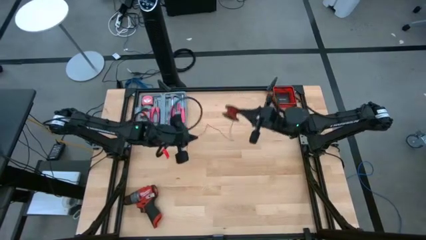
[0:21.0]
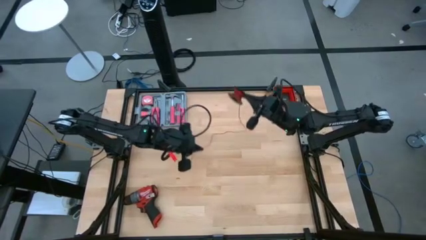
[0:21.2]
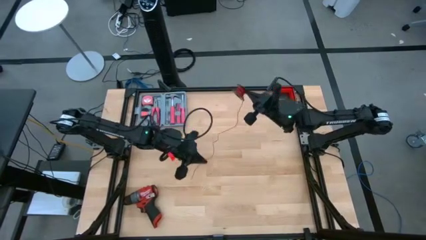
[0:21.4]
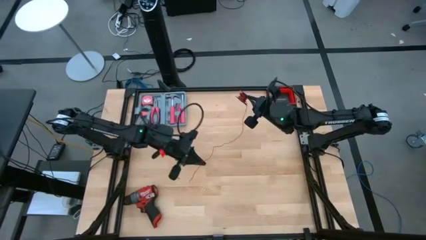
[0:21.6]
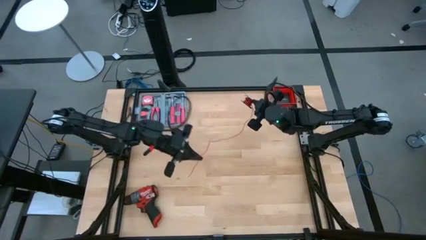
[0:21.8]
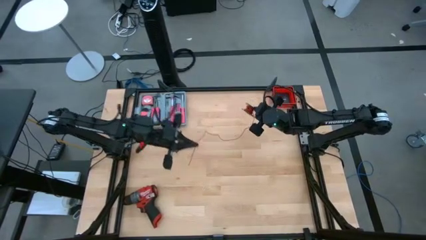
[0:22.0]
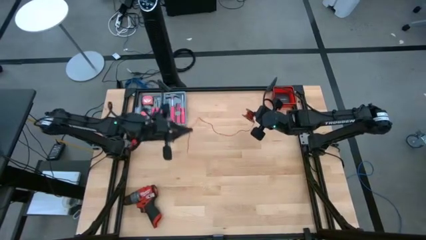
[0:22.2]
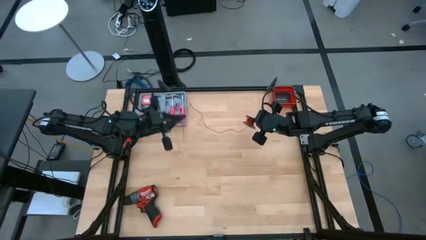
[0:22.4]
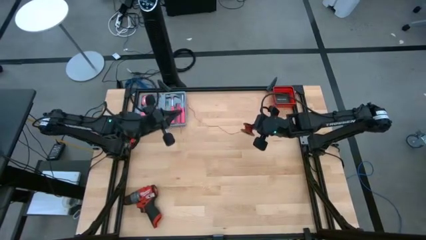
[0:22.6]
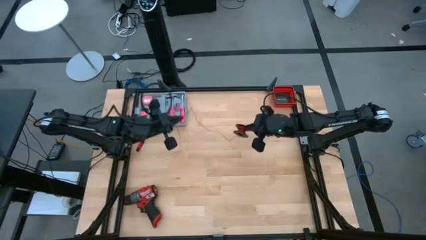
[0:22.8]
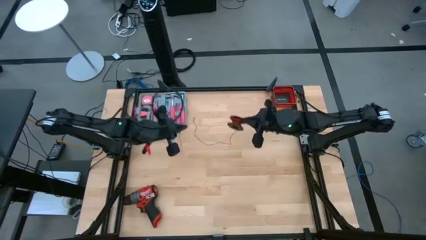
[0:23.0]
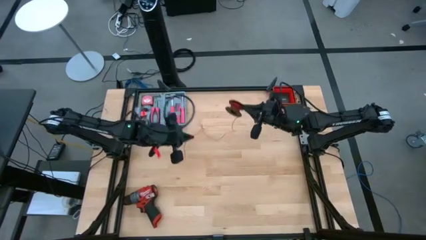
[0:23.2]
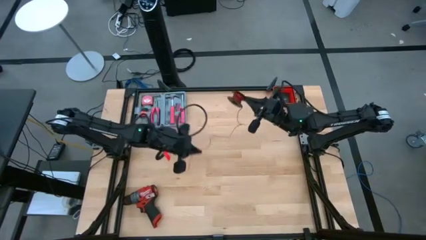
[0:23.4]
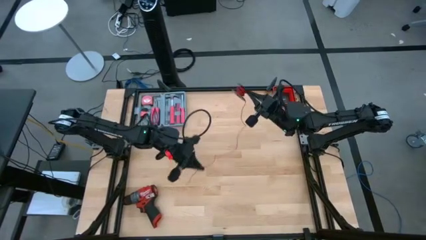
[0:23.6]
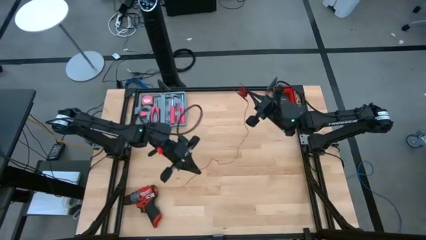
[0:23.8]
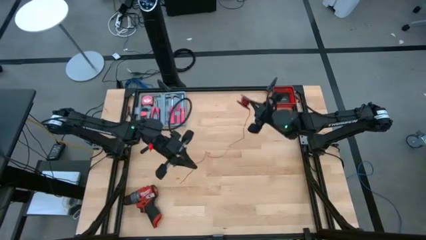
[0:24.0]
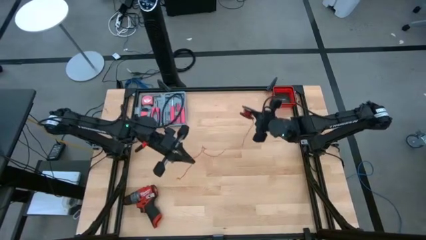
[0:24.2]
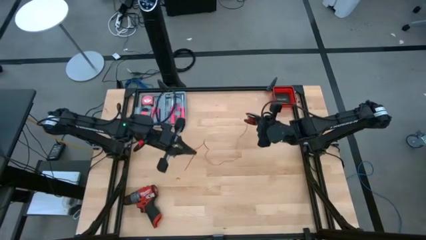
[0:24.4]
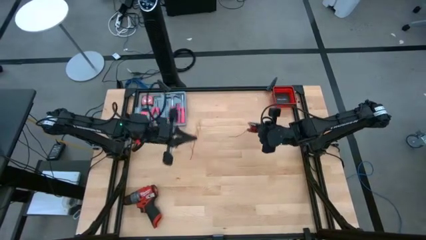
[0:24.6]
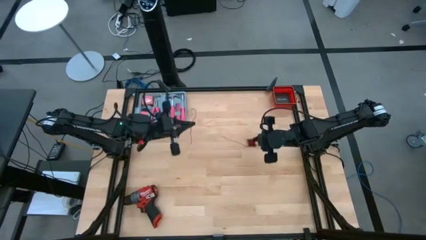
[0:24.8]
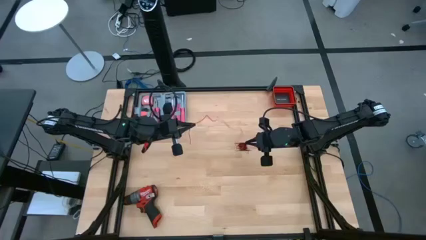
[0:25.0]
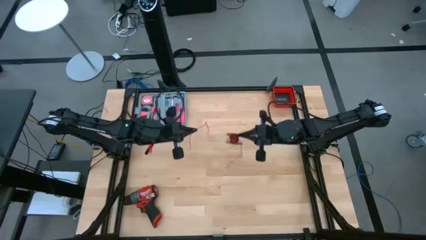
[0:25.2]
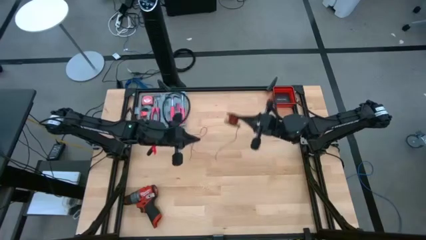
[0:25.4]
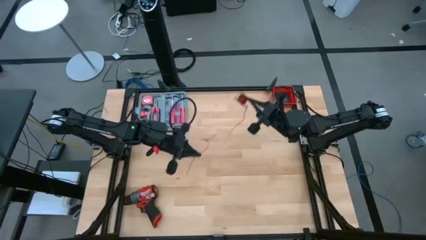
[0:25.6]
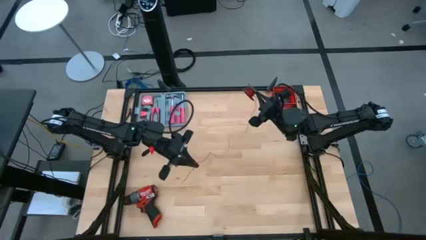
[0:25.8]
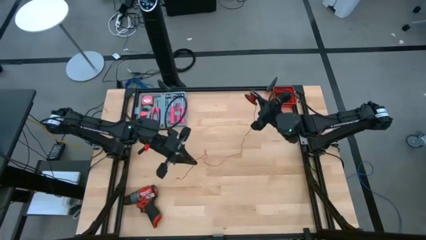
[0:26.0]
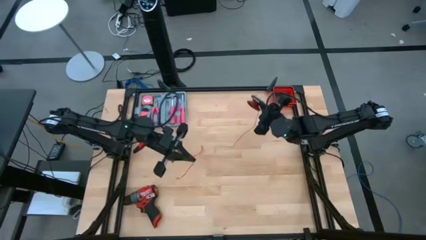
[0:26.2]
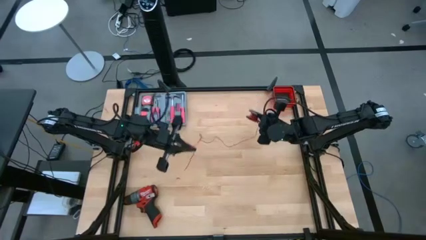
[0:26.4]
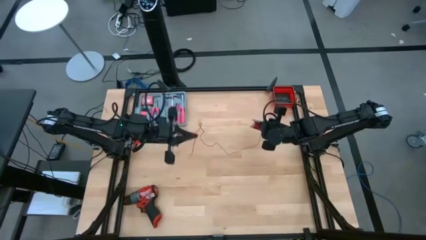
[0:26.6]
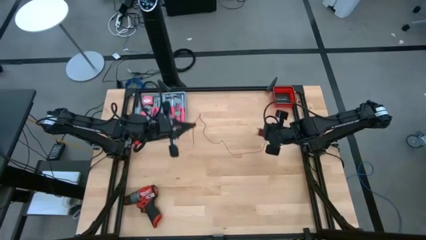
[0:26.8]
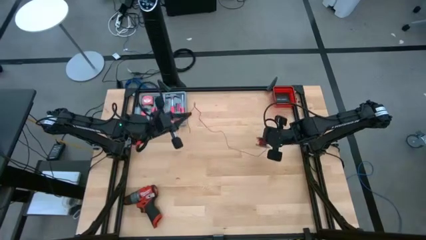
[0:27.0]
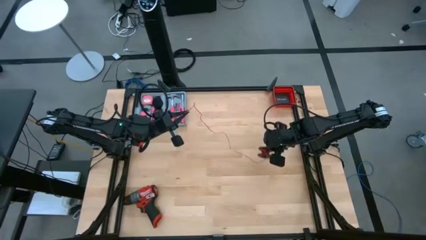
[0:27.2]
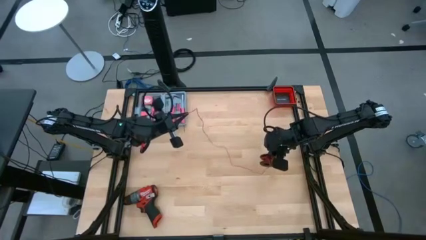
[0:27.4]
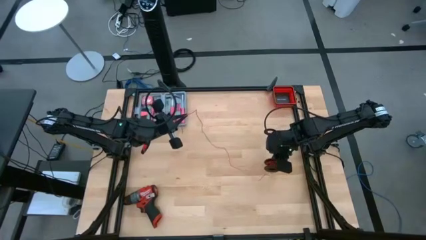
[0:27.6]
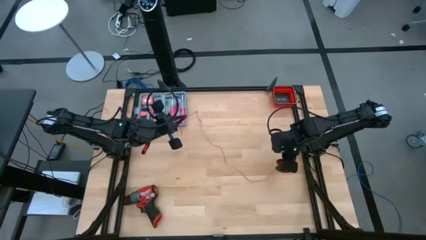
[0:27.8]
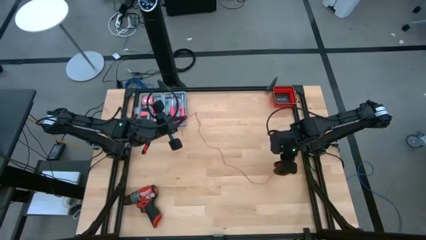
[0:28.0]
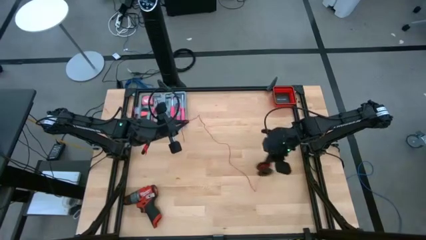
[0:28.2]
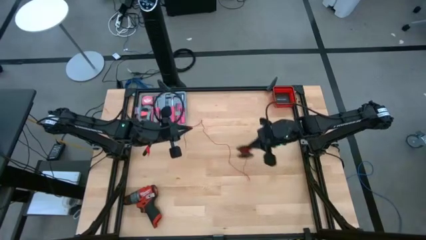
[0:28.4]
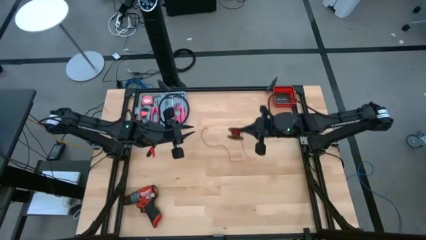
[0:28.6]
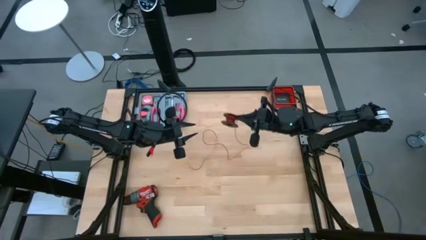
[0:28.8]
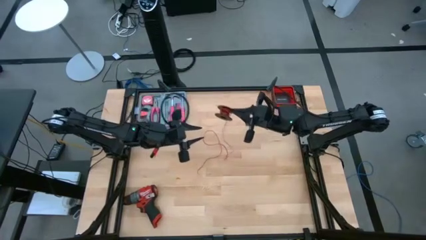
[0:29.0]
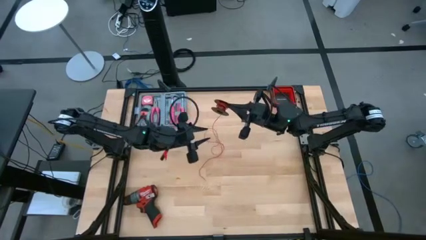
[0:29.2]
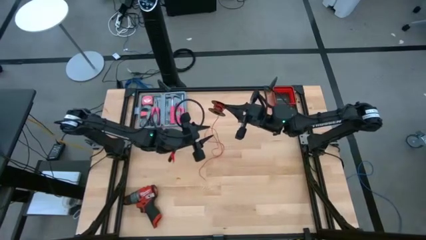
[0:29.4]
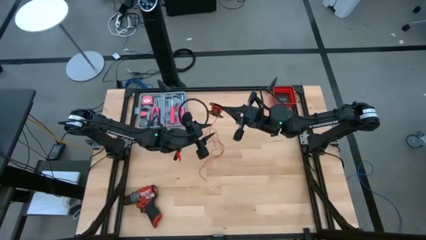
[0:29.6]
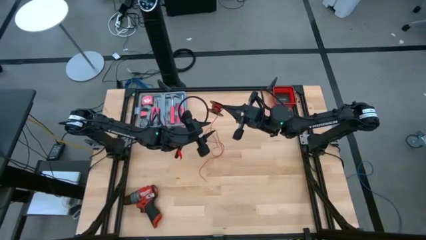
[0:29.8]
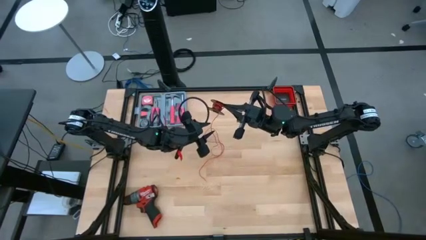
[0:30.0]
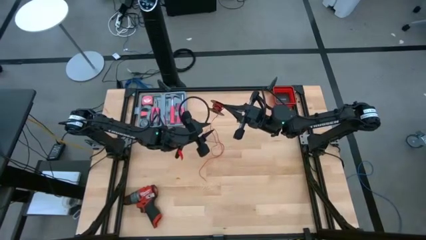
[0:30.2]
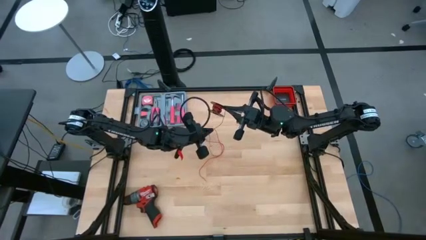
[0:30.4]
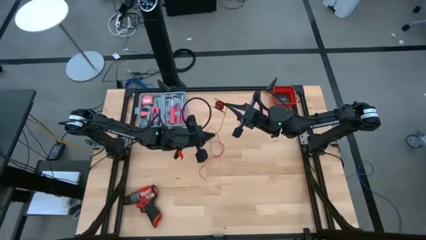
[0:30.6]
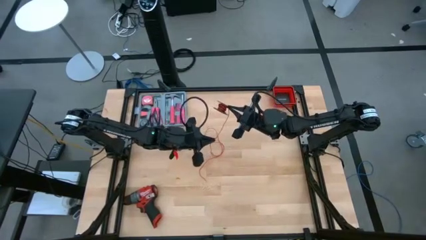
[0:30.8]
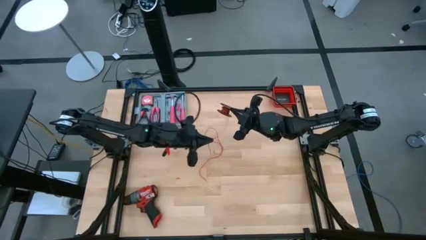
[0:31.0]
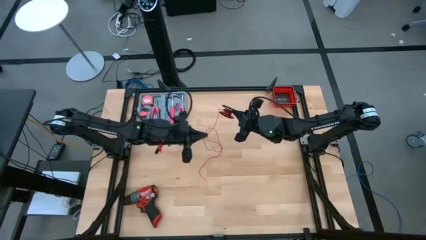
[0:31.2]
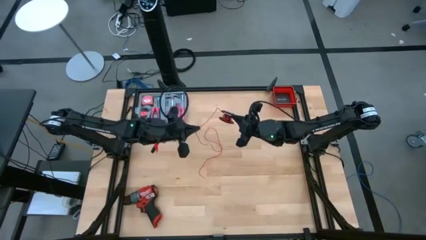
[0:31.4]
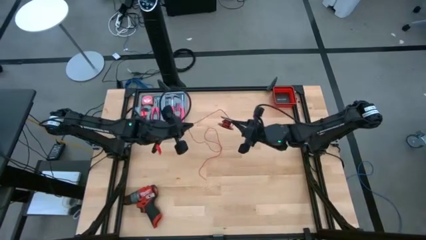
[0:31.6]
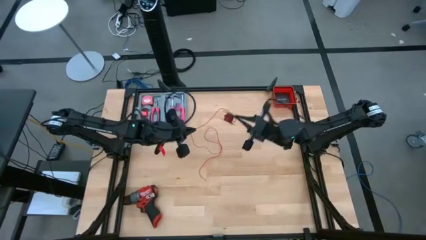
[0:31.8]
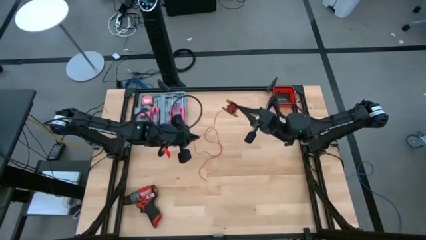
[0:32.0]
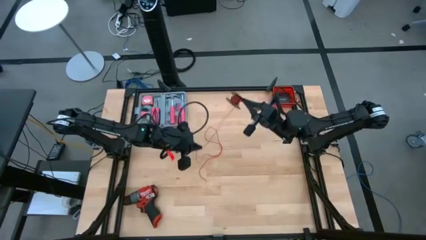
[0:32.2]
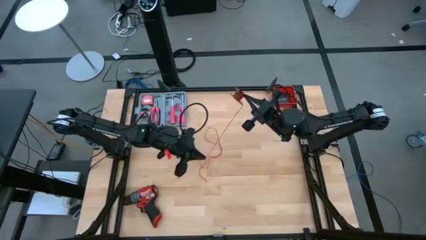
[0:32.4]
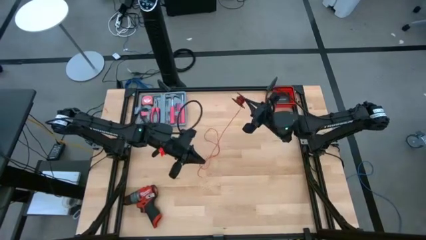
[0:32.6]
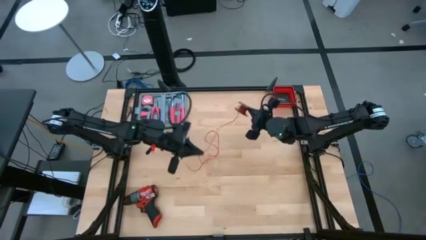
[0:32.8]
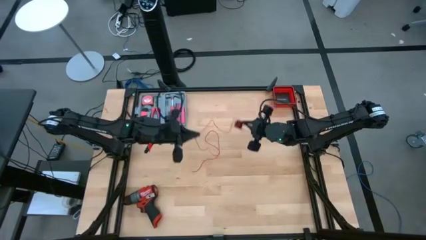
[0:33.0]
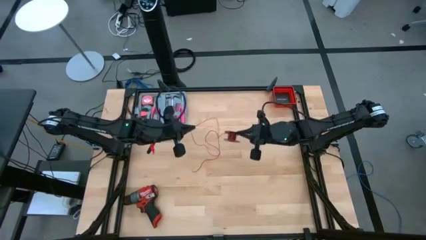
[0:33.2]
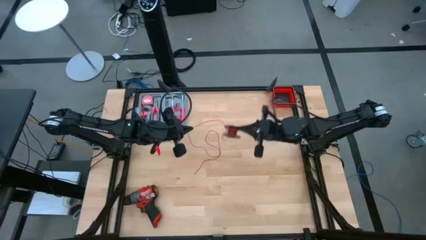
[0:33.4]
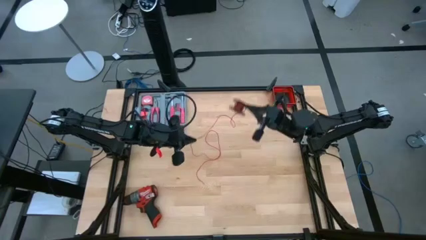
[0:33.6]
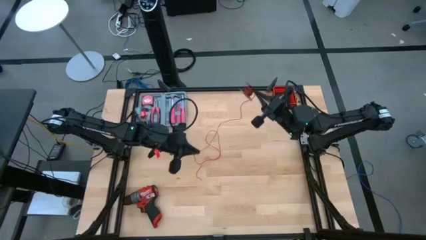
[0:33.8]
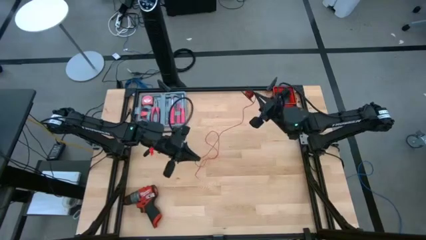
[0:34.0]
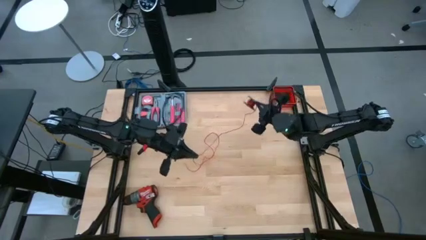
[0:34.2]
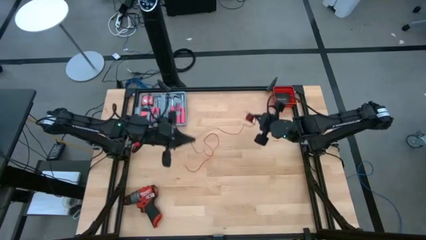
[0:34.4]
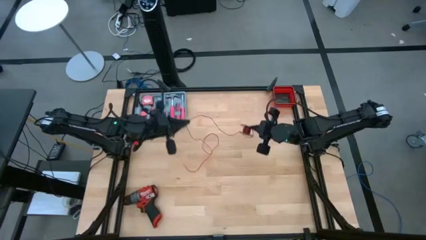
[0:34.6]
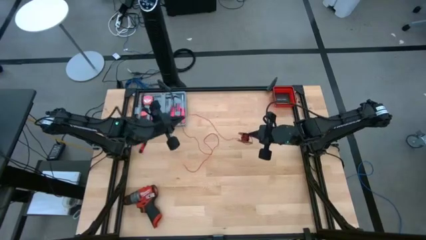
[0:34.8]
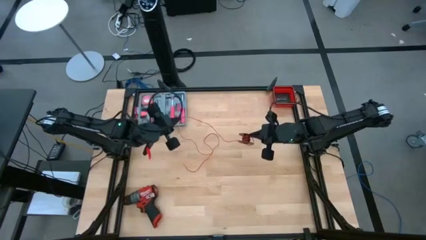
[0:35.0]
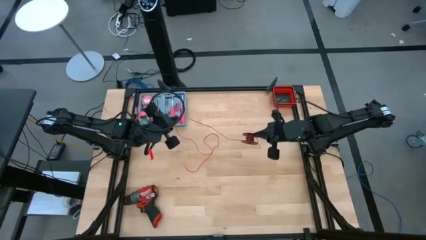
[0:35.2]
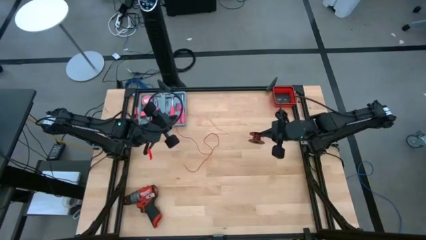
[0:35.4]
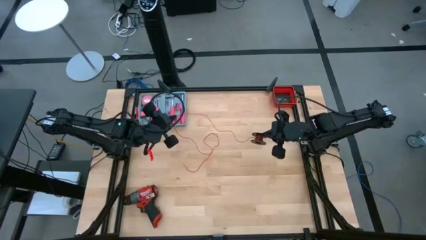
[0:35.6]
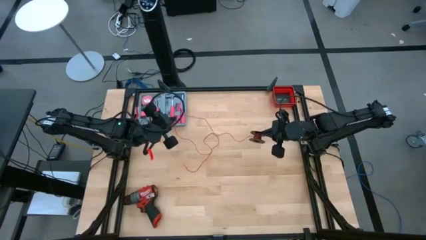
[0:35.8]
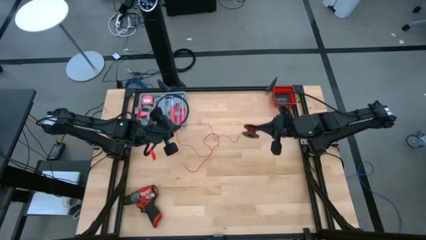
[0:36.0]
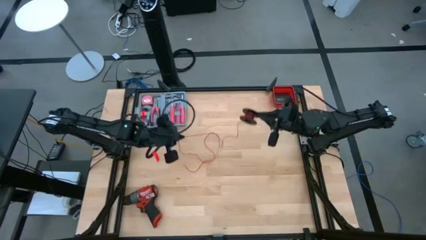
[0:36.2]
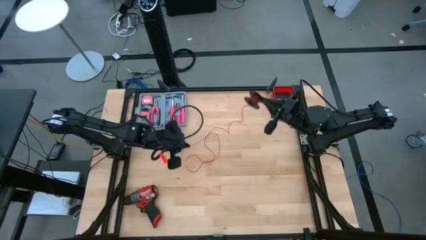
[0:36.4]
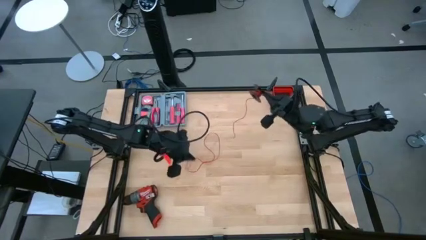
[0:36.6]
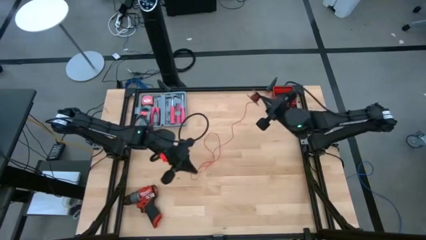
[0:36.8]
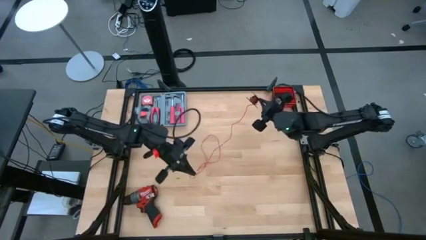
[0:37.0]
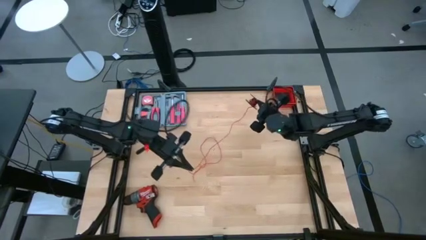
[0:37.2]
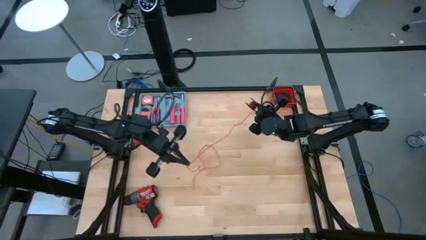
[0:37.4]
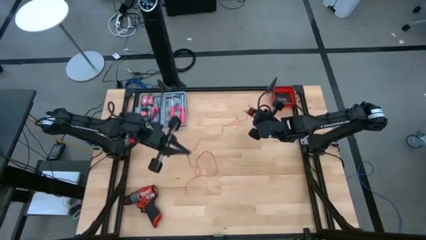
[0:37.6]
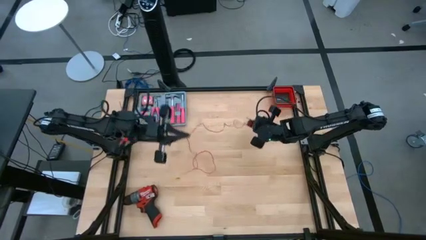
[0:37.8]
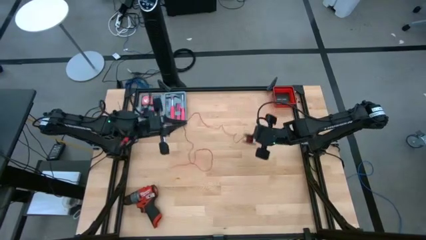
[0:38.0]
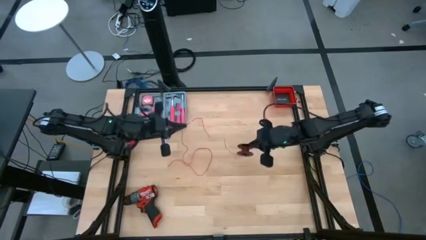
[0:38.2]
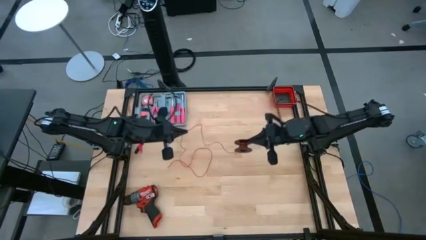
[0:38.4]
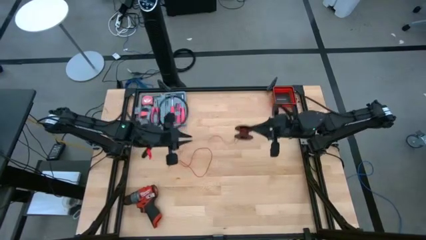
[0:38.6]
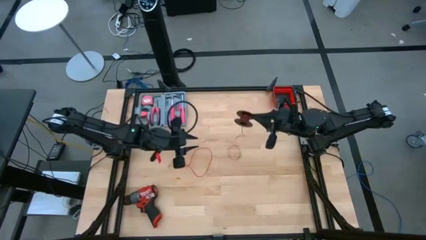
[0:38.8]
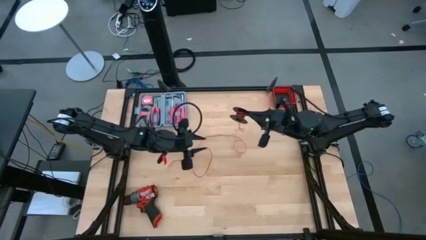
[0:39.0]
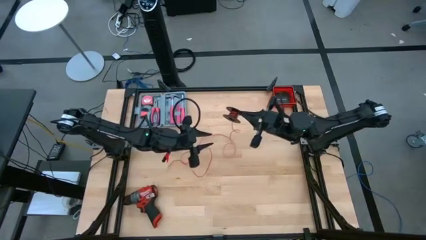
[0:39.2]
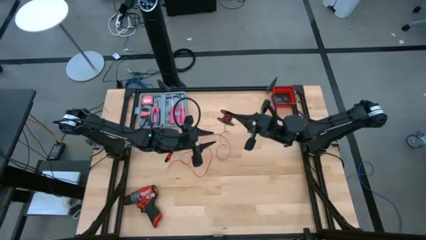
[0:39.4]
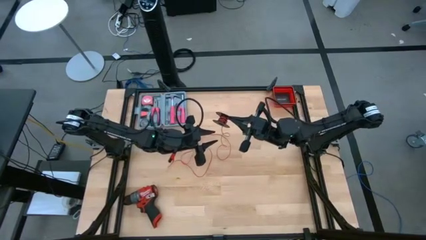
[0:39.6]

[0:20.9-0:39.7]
Task: Coil cords
Uncoil the red wire
